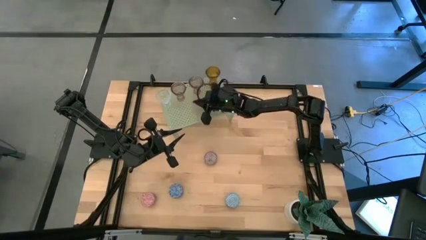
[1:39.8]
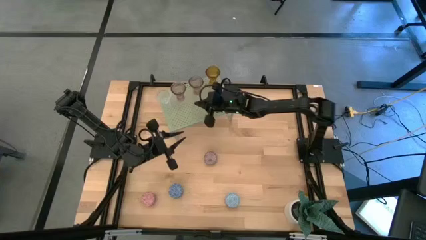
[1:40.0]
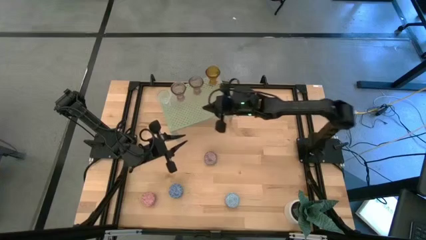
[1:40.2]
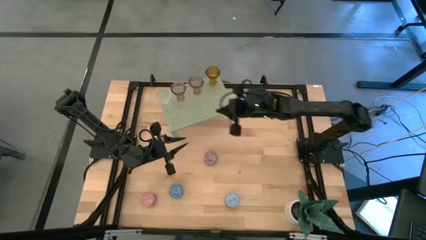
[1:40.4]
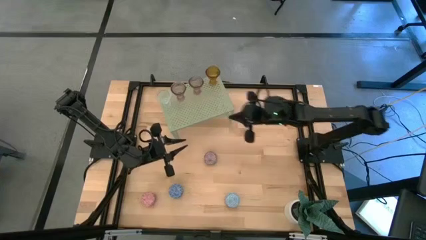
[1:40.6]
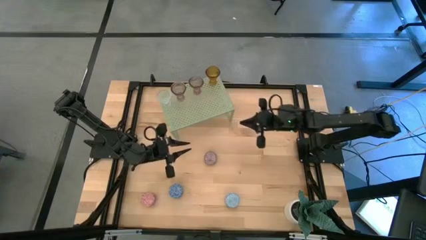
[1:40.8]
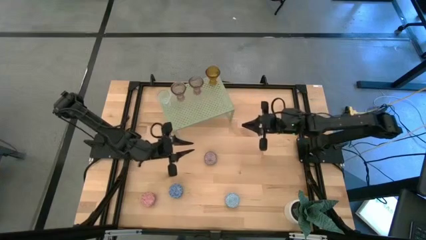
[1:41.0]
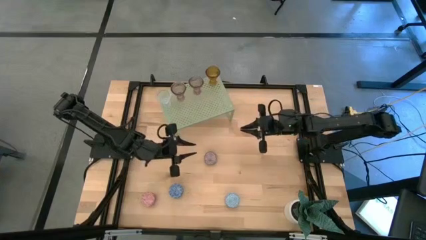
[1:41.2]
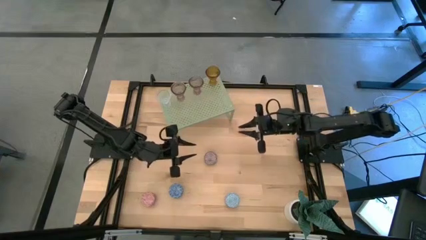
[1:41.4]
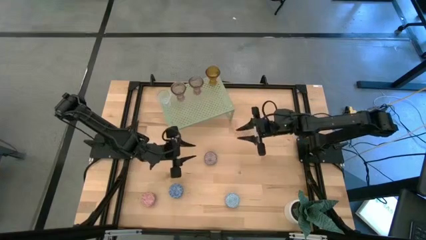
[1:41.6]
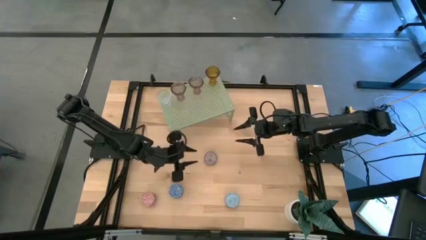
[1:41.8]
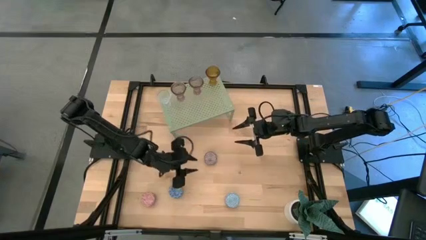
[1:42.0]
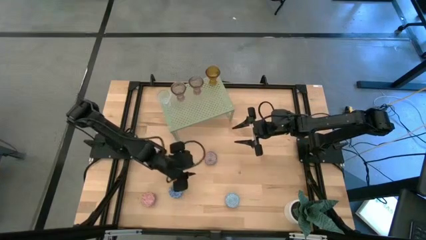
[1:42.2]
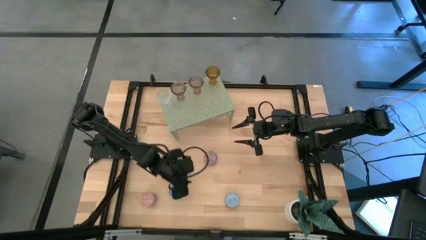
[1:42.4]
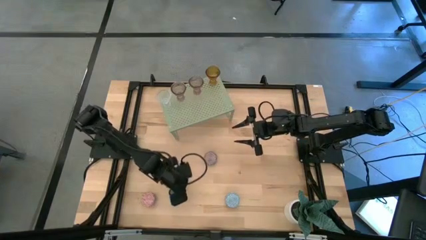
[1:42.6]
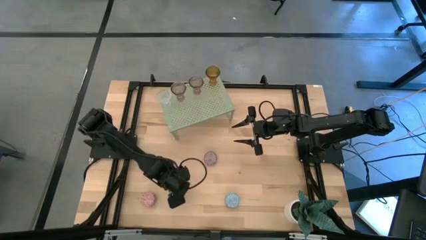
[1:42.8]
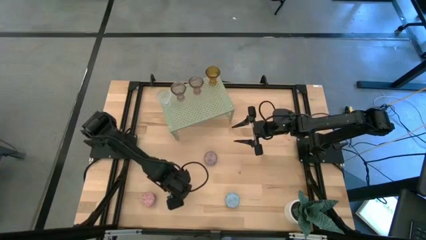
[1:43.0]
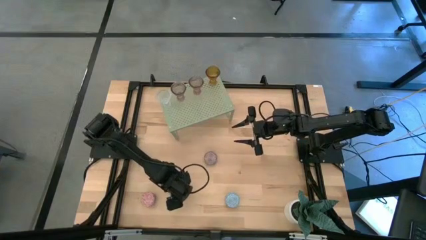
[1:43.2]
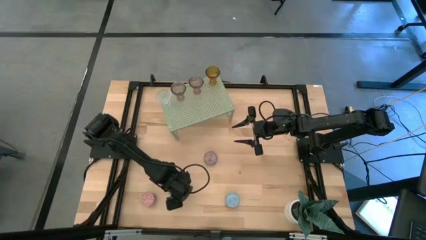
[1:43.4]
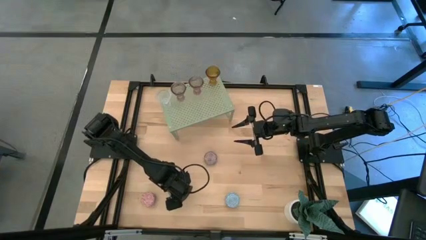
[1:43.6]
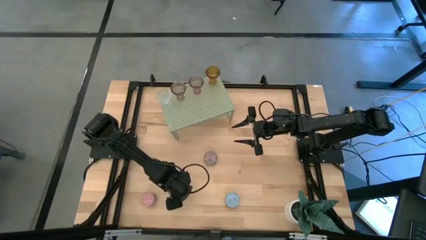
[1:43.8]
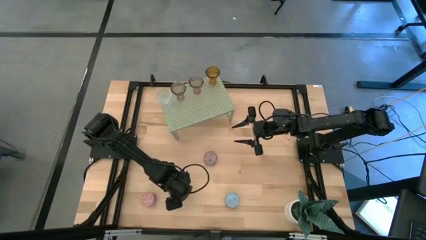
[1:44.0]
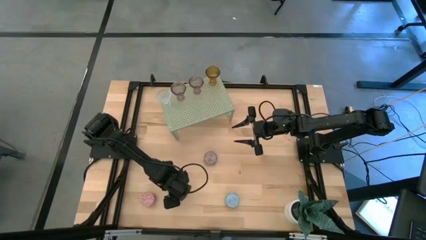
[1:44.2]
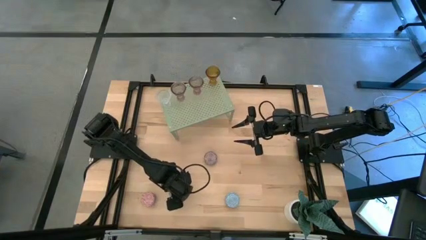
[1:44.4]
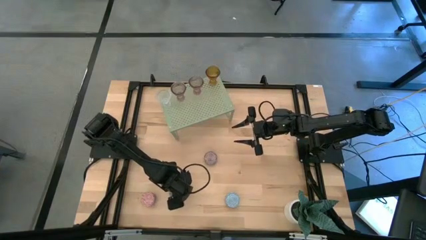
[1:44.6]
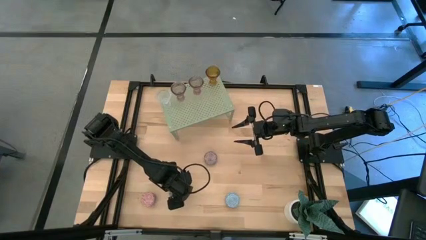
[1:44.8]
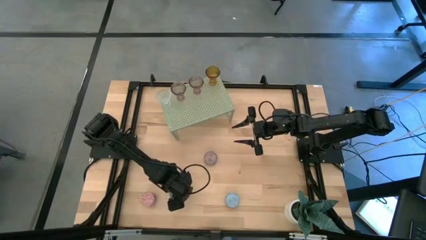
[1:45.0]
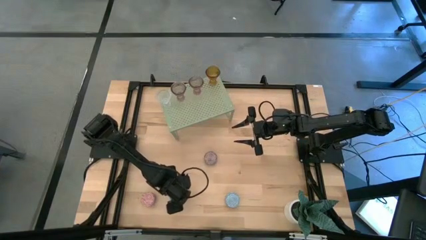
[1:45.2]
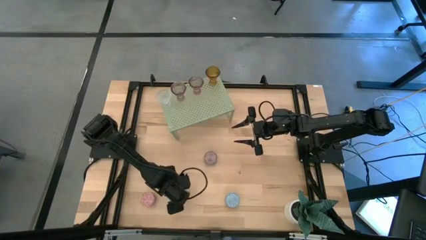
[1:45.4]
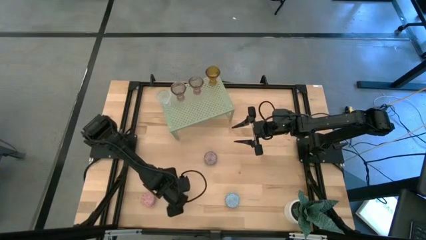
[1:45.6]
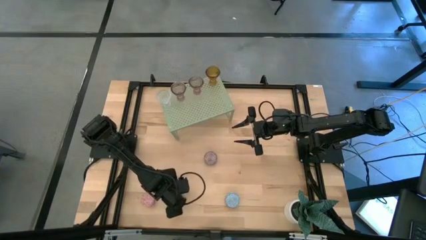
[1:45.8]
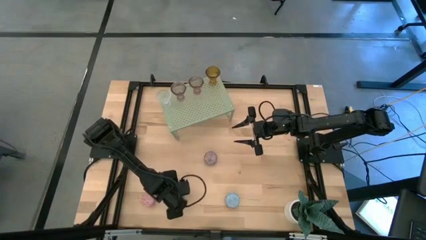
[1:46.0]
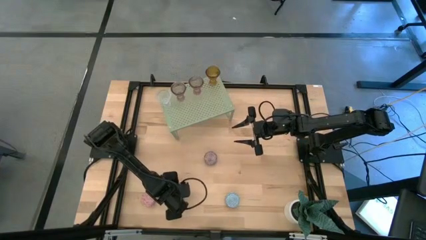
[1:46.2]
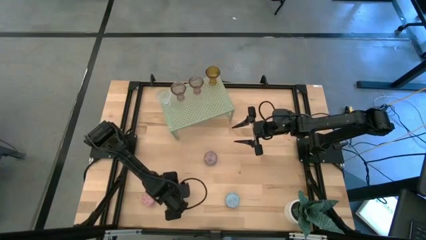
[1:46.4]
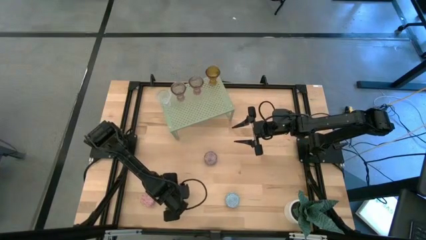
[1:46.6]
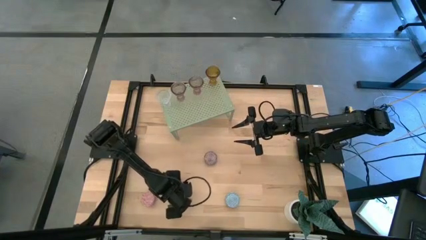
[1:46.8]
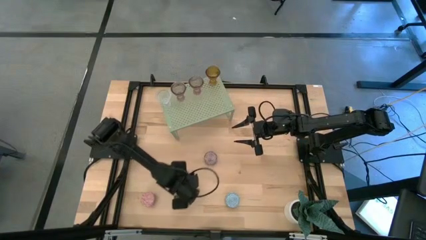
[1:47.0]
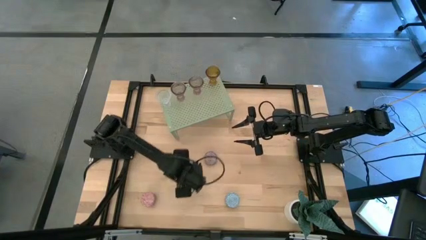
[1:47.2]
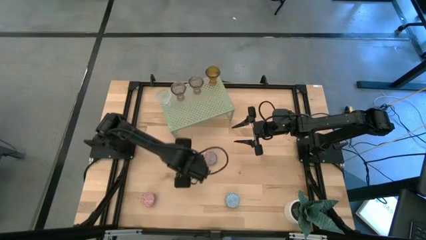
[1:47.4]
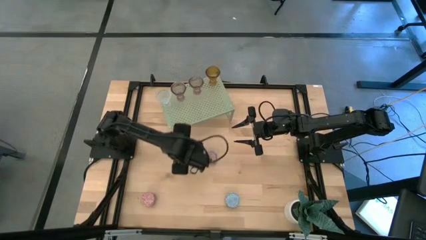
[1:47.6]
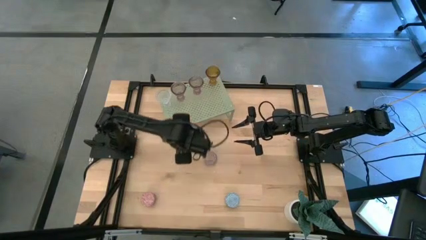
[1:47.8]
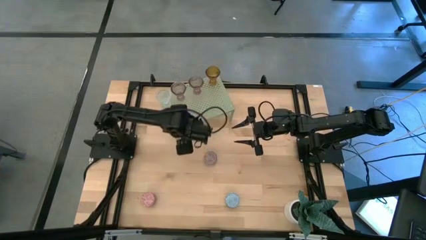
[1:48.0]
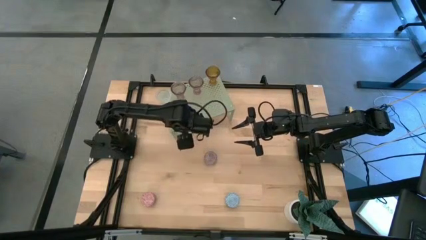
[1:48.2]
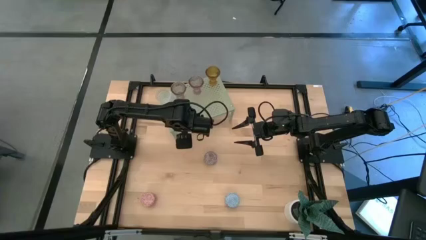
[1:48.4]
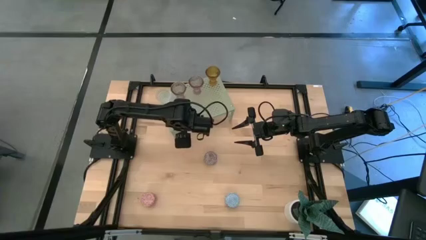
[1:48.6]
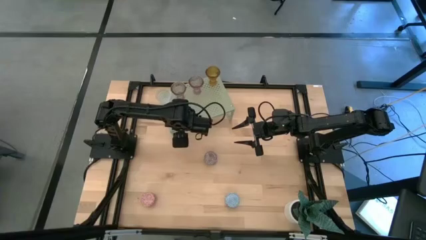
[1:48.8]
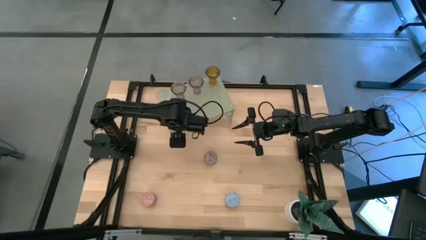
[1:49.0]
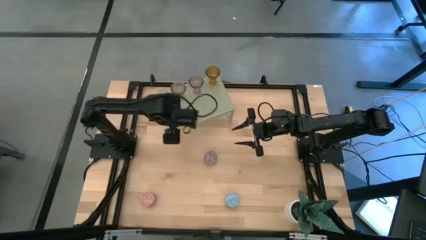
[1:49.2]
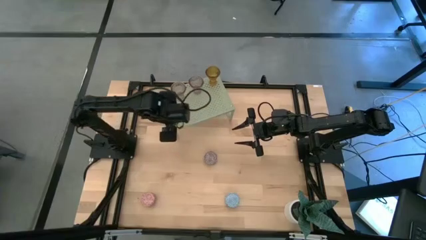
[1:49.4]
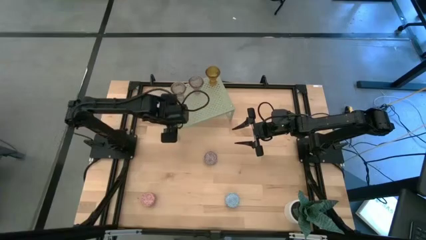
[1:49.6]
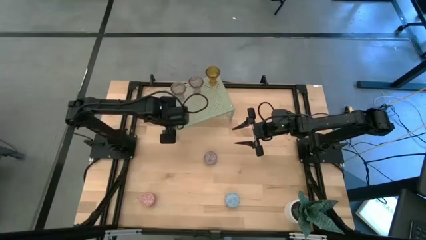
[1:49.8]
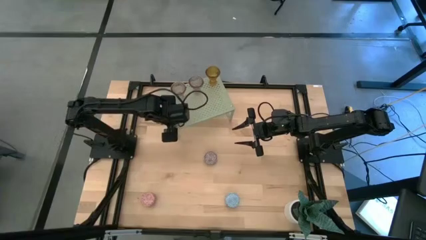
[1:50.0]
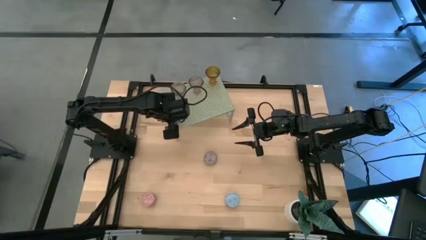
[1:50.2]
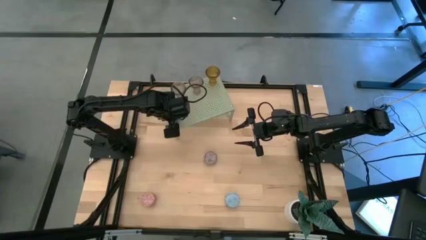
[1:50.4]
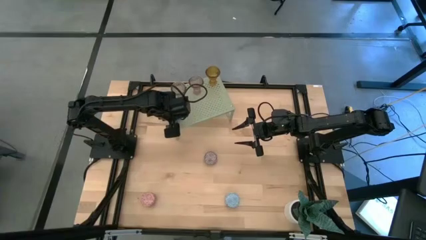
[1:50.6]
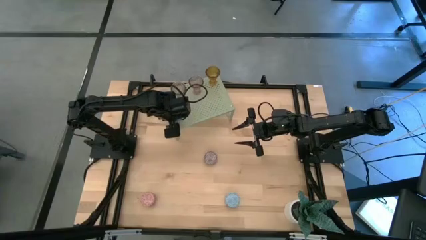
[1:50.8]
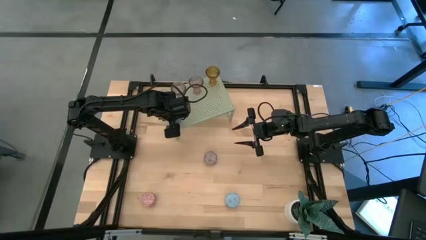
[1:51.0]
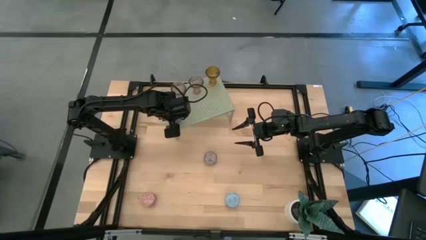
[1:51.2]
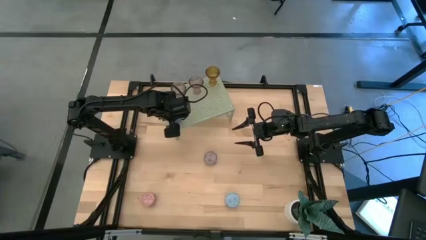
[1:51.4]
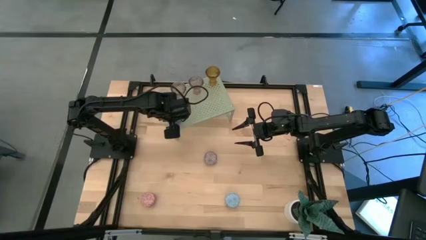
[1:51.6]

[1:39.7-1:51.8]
Task: Pick & Place candle stick holders
Put the blue scented candle on the shelf

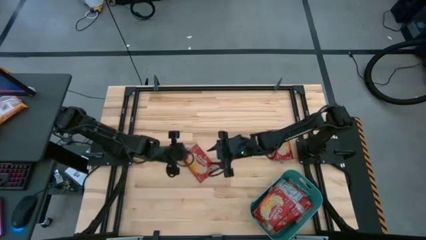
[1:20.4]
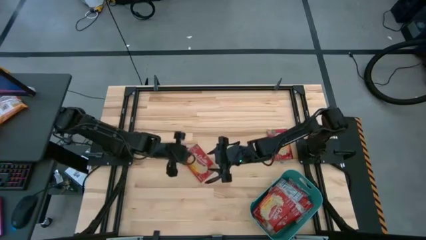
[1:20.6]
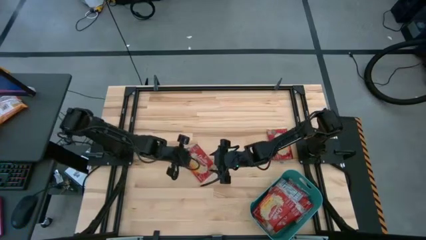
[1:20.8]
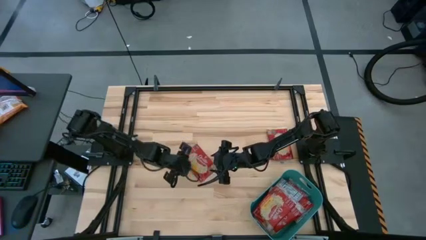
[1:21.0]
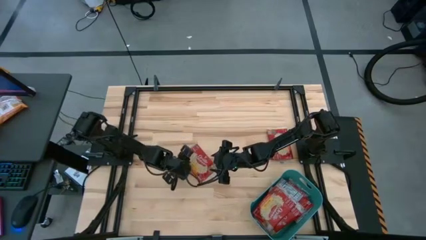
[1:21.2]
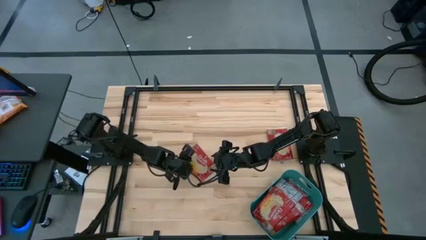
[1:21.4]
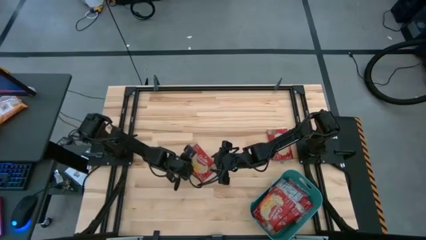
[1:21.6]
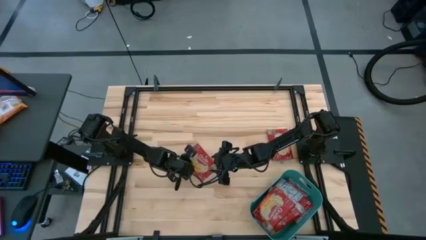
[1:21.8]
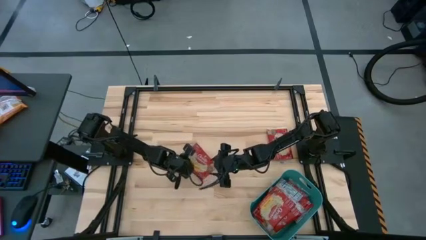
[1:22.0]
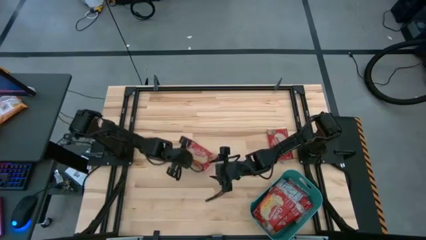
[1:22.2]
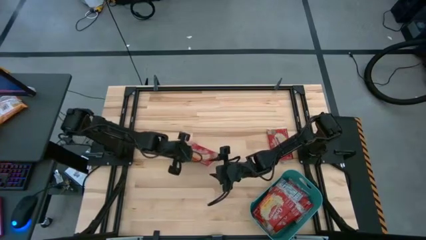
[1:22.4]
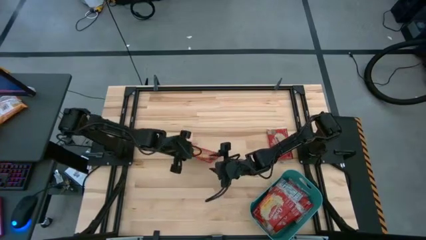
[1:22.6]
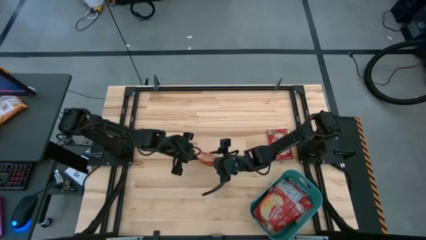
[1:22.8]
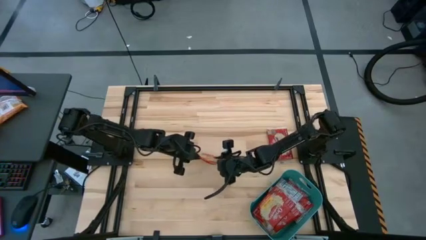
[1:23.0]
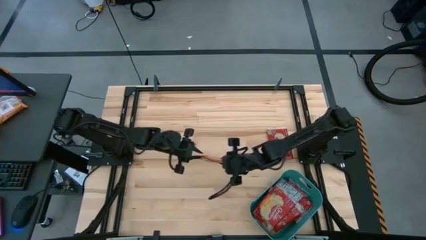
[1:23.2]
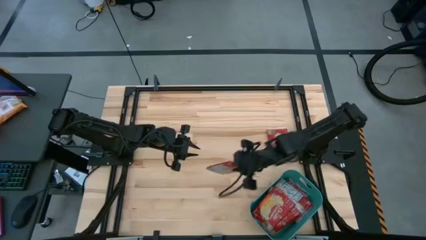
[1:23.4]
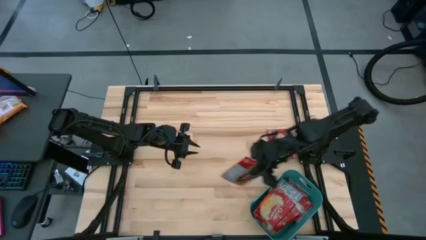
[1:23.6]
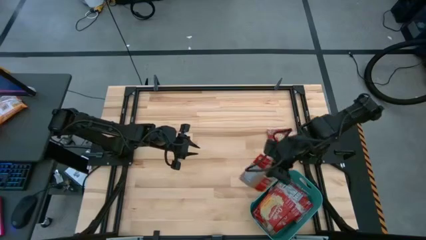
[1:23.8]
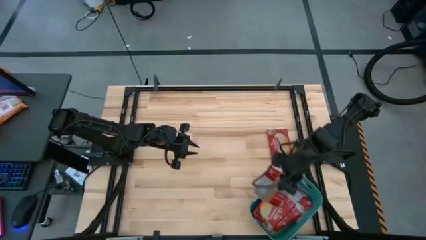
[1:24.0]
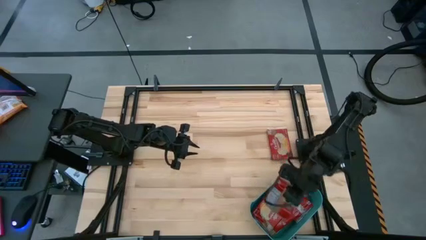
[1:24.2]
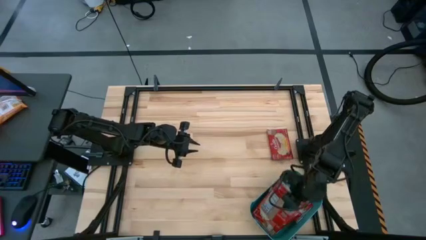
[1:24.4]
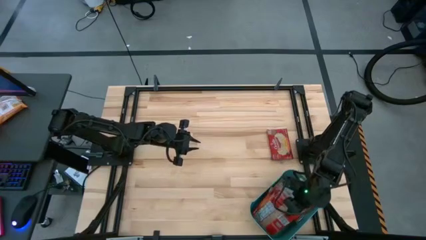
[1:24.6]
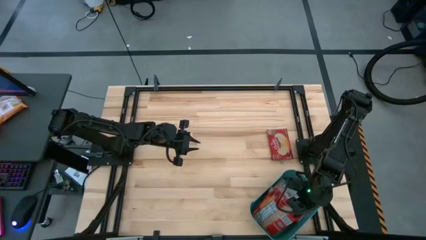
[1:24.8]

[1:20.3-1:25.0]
Task: Sort popcorn bags into baskets
Put the red popcorn into the green bin
